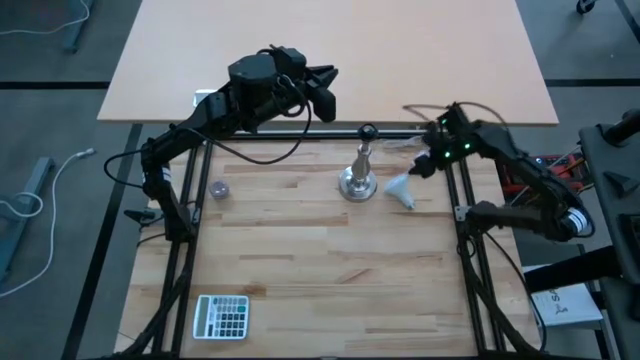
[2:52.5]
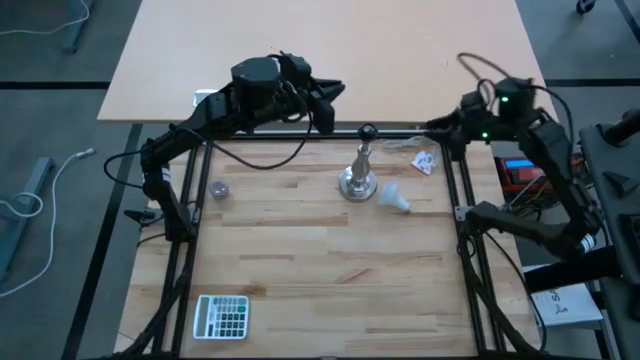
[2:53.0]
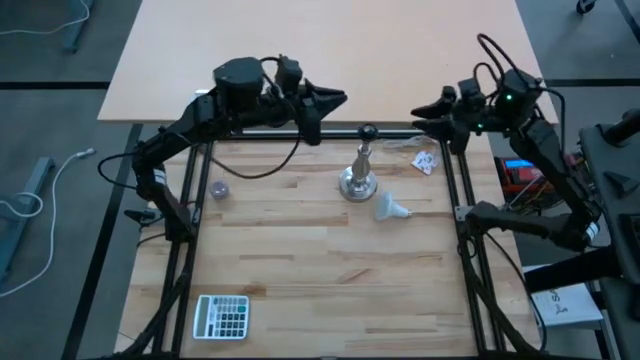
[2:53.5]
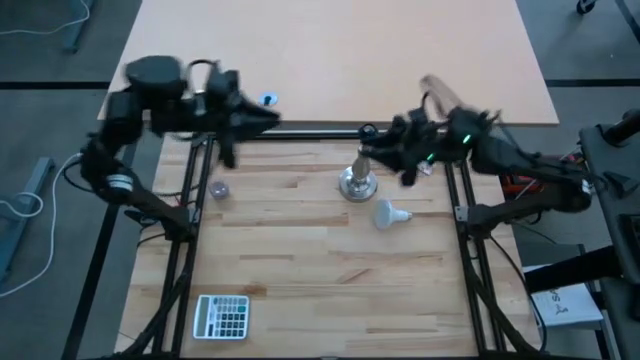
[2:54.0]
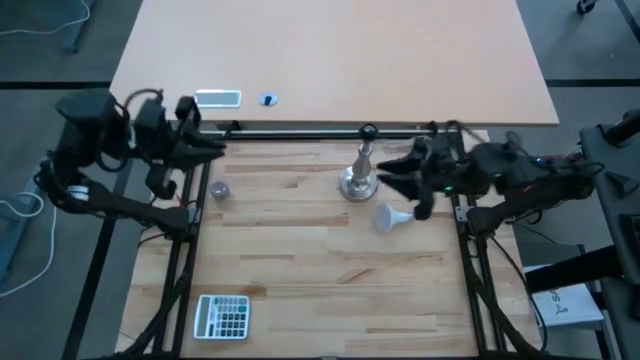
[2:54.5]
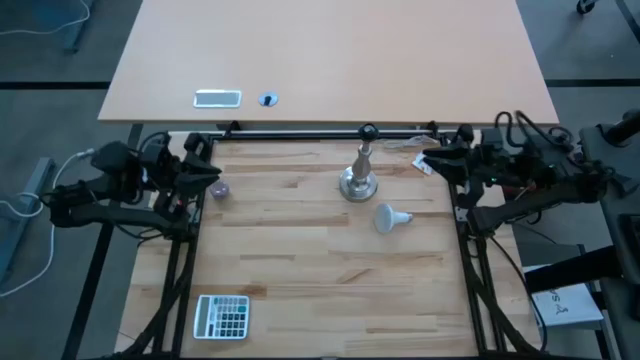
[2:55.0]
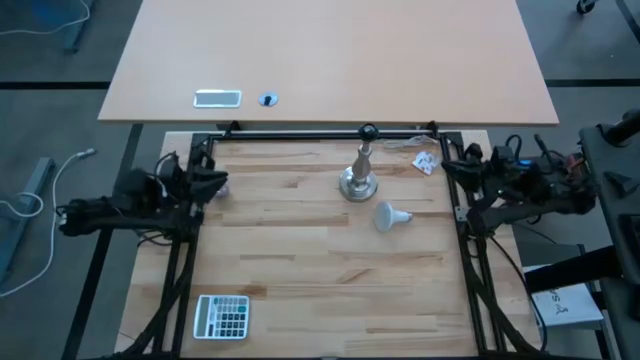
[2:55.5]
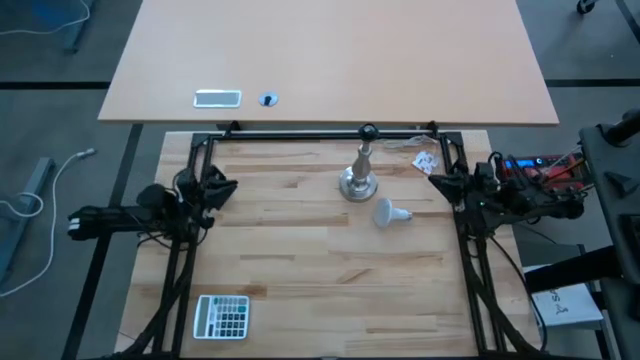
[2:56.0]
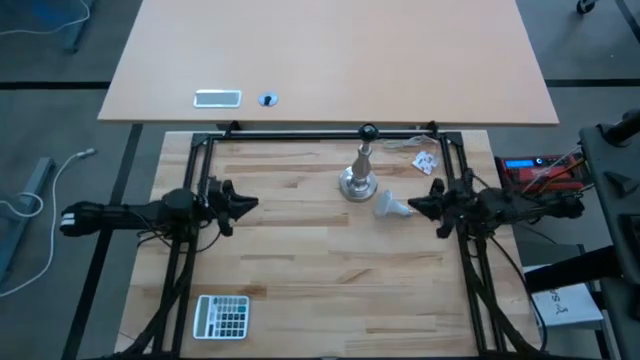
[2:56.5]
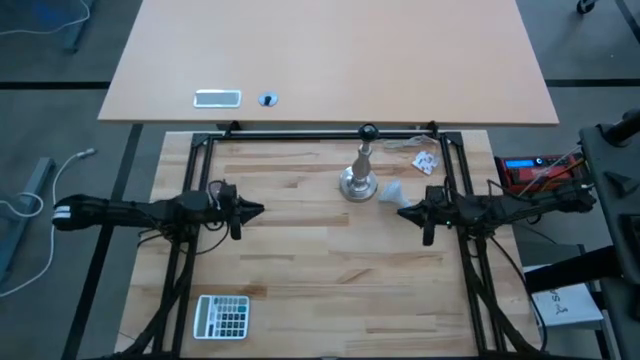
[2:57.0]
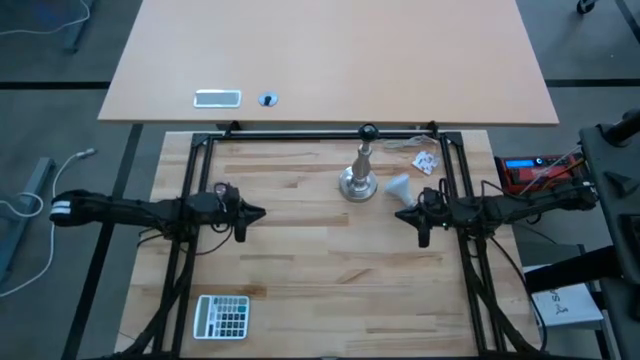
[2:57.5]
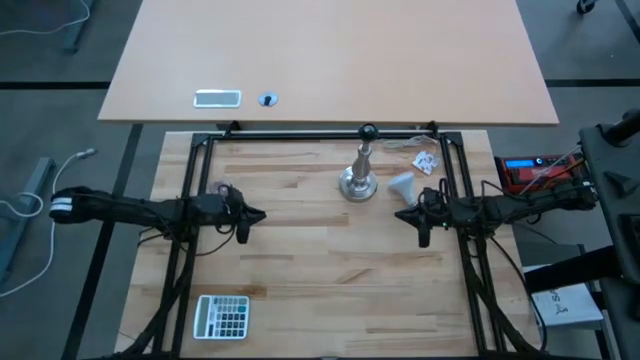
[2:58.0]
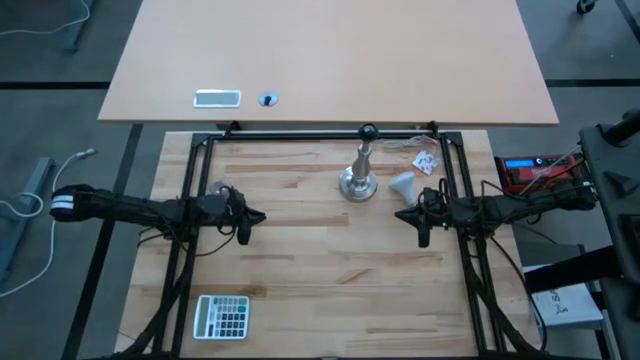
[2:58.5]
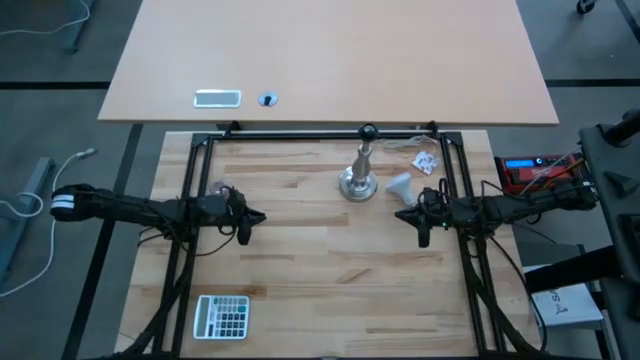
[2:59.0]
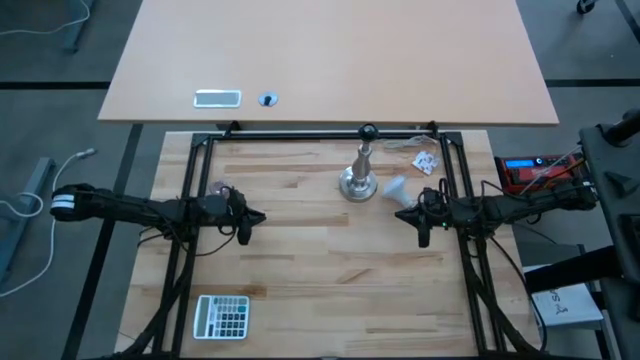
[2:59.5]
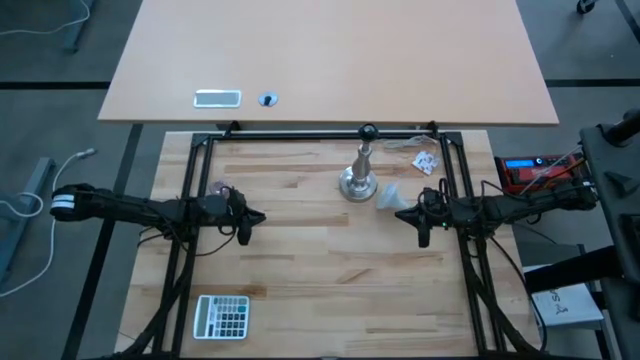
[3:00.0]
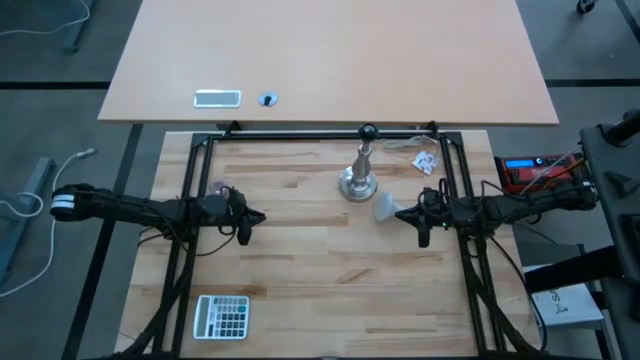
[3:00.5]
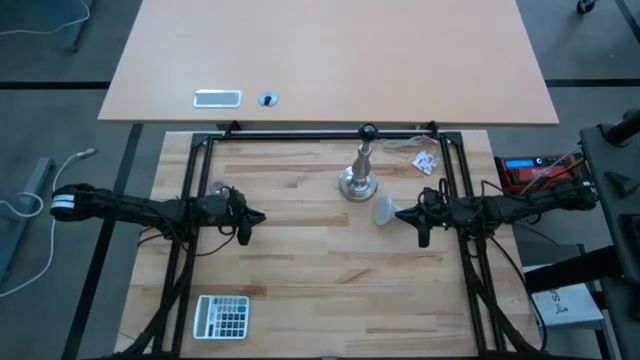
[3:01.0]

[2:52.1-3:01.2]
Task: Screw lightbulb
Return to Home Position

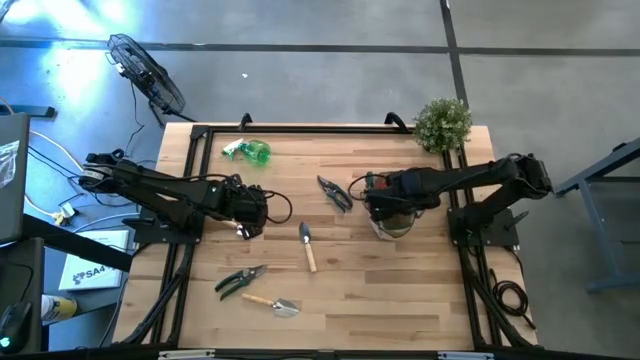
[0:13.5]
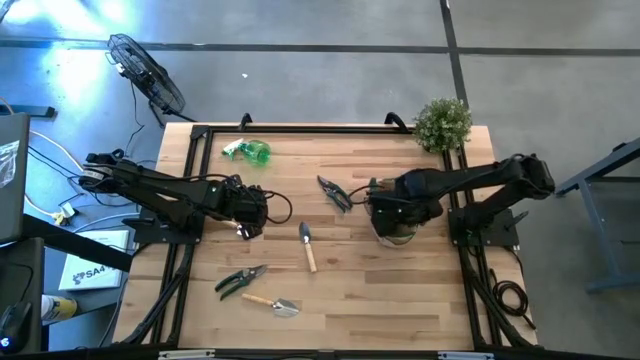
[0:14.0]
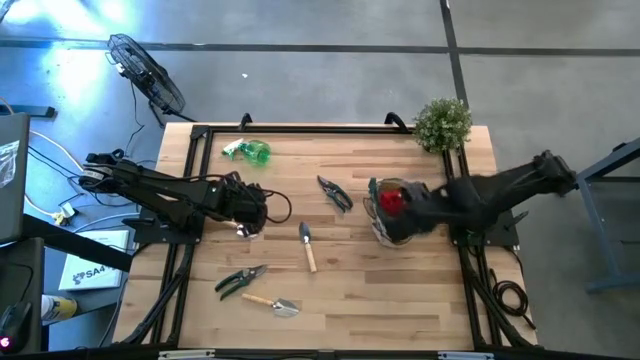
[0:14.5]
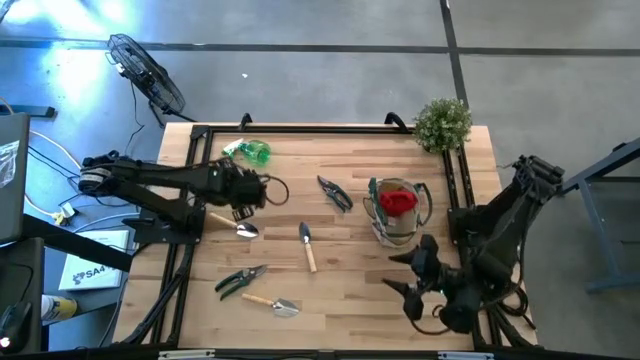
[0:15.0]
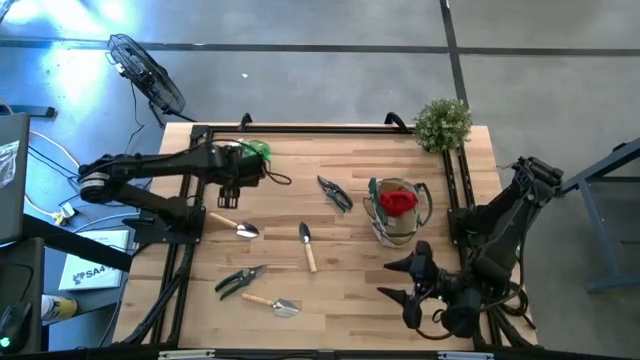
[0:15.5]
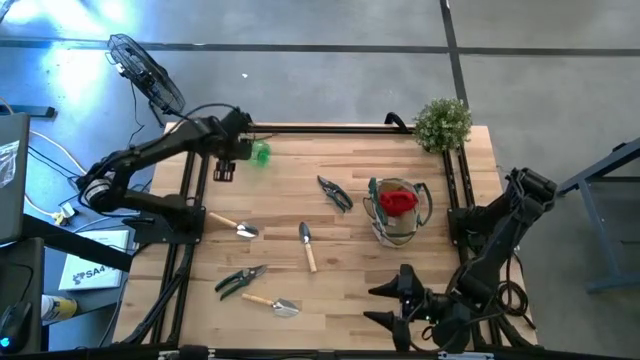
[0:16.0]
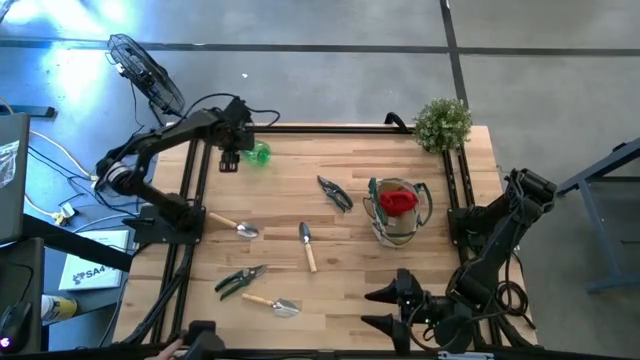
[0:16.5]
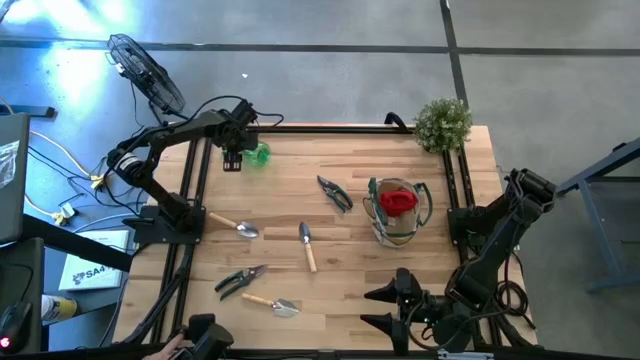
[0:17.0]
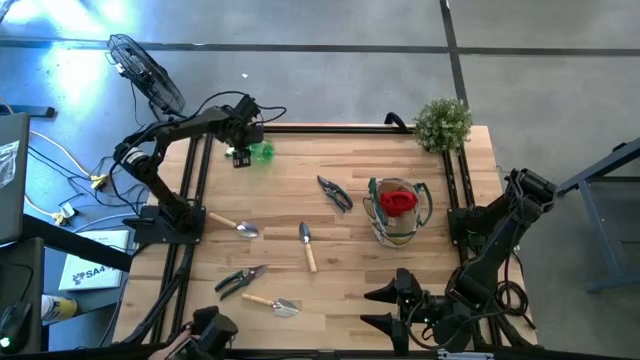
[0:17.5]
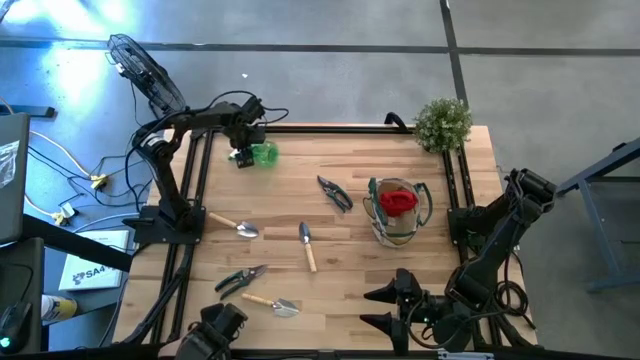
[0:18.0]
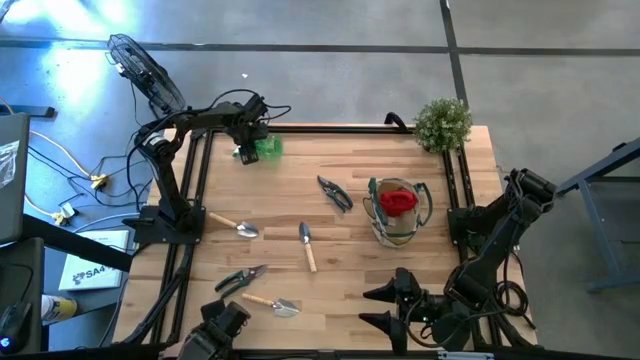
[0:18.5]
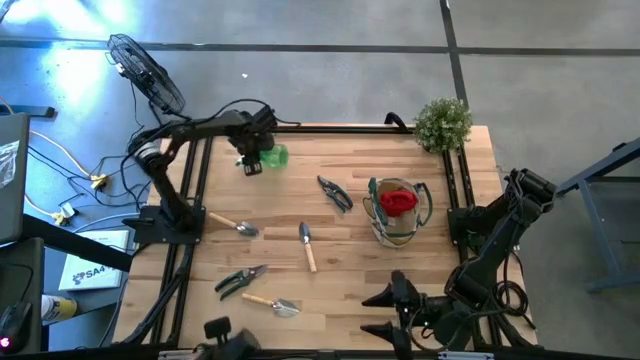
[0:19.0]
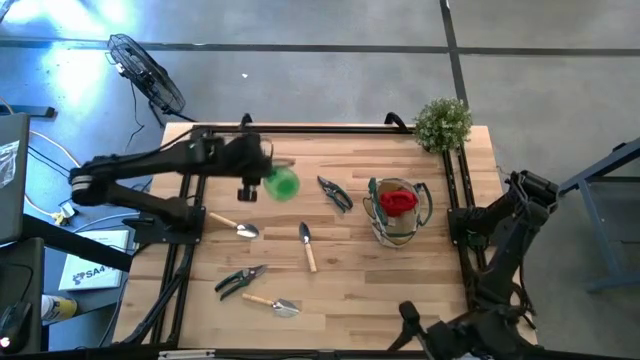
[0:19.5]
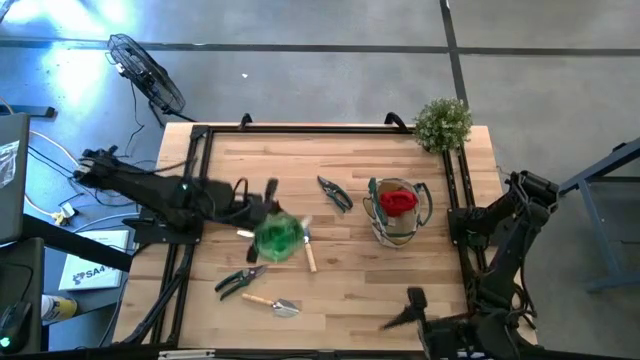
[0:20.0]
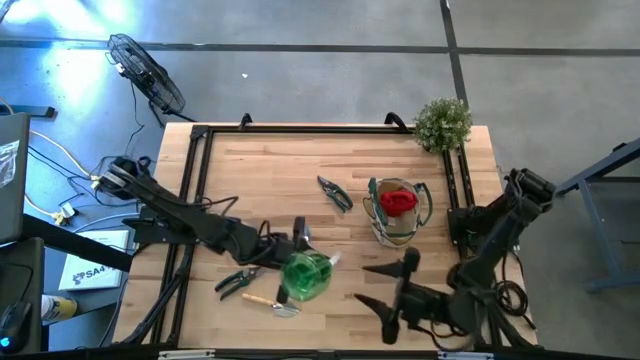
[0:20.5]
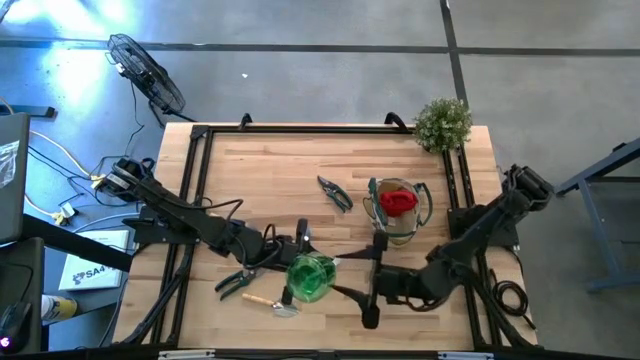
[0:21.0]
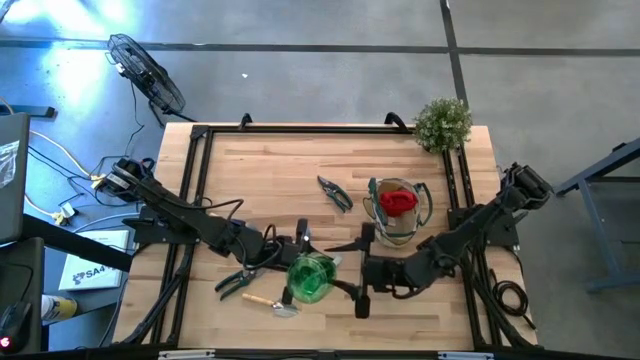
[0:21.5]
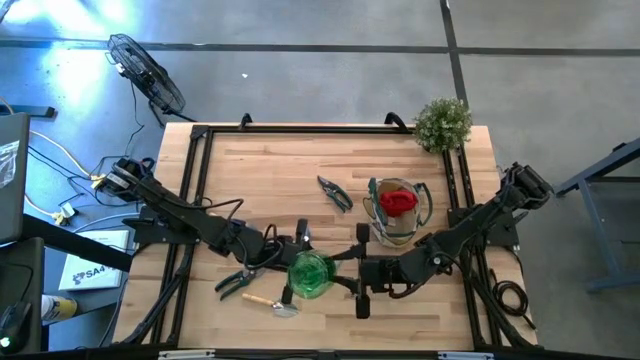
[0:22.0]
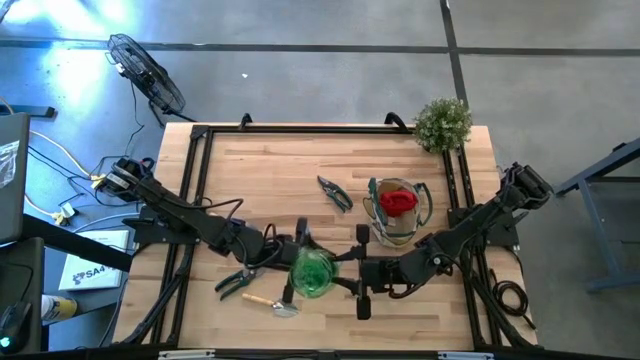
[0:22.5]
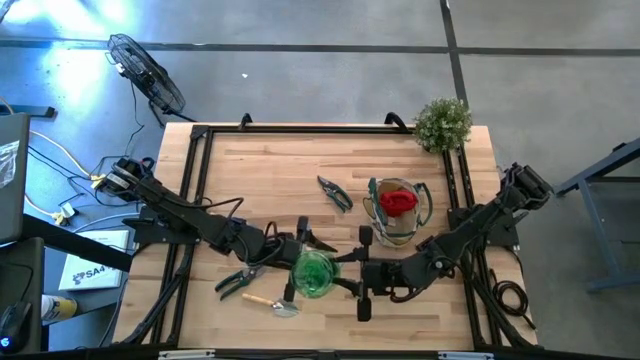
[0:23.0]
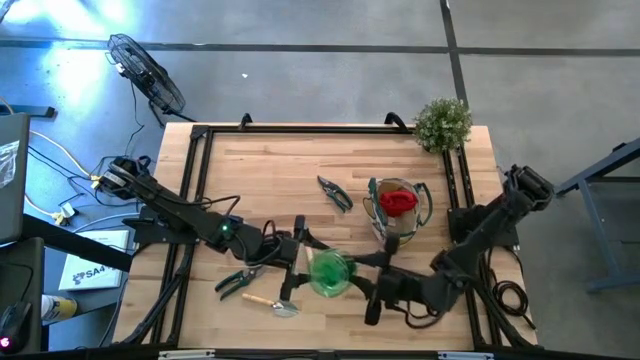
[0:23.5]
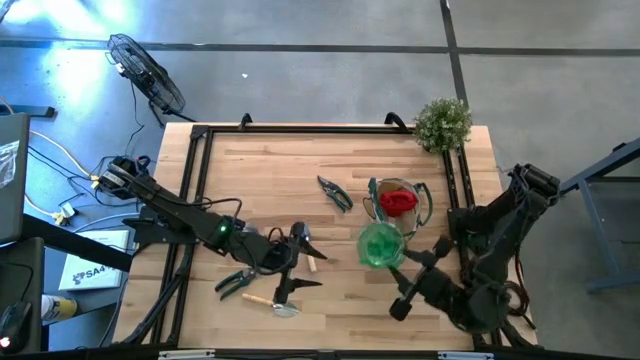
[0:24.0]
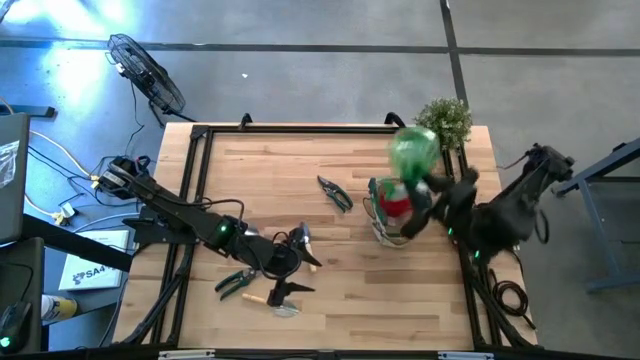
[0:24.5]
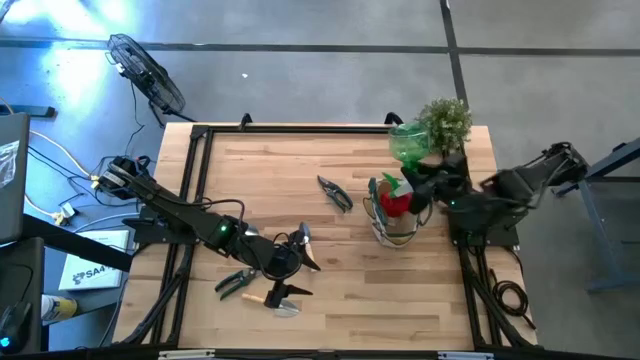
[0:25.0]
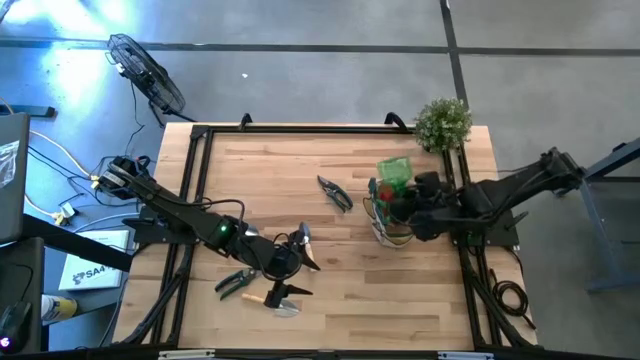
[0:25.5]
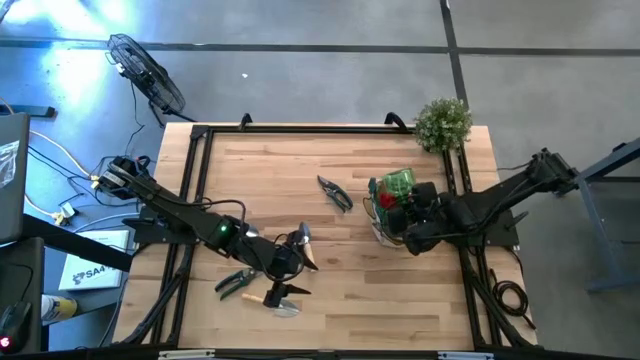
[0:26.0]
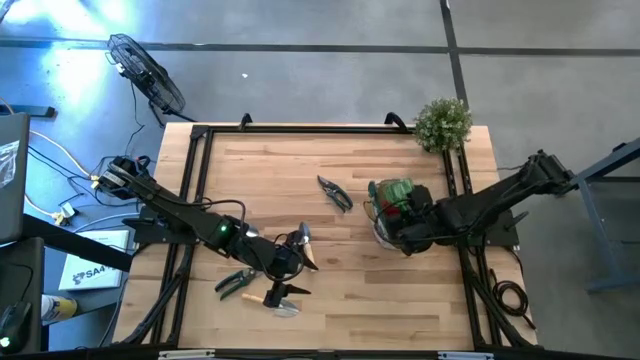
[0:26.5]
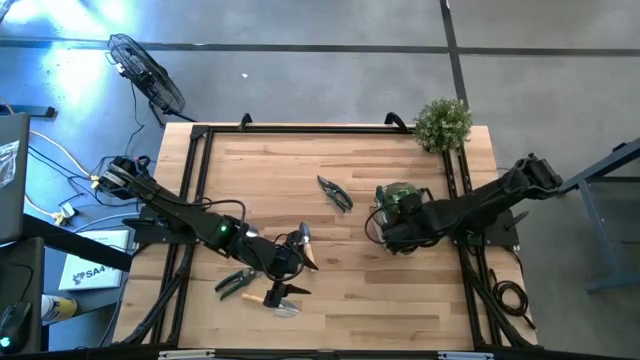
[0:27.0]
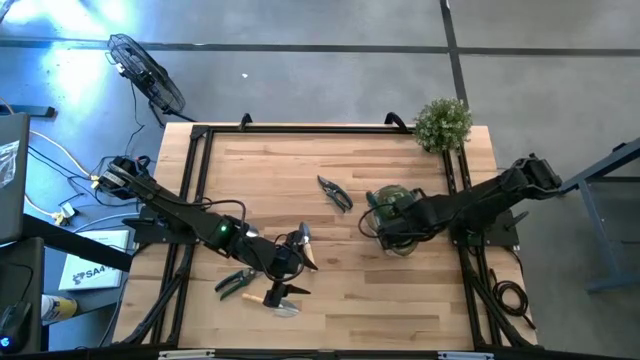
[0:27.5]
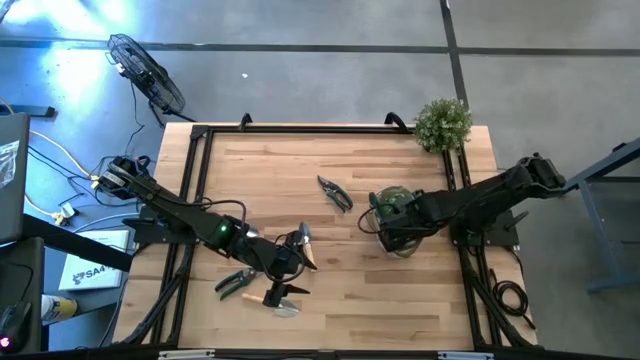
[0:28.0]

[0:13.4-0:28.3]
Task: Pick & Place Garden tools in Gardening bag
Put the green spray bottle into the gardening bag
